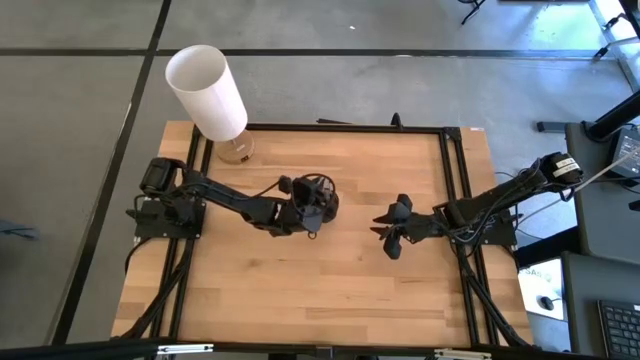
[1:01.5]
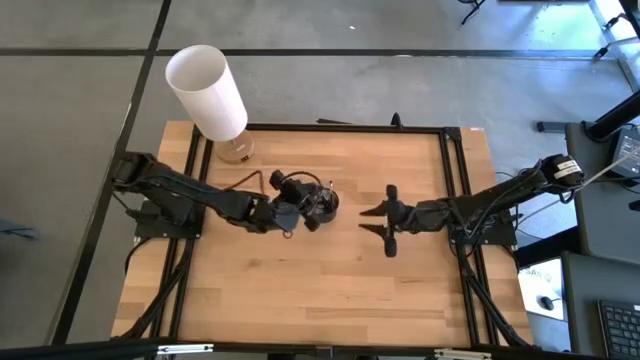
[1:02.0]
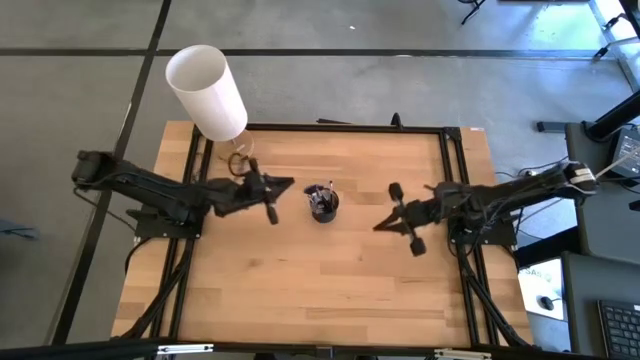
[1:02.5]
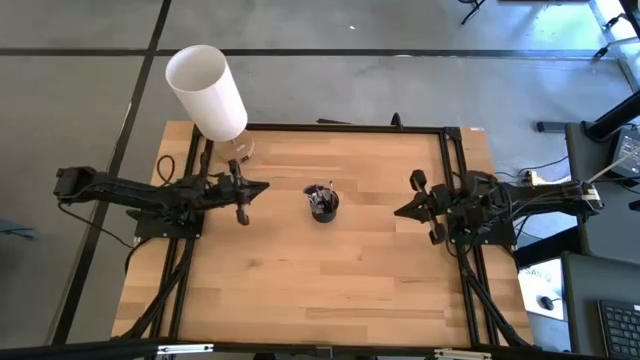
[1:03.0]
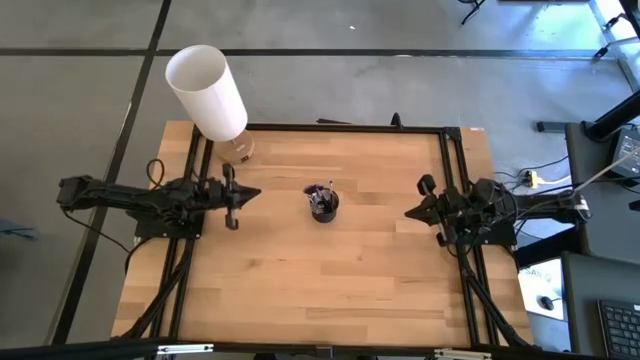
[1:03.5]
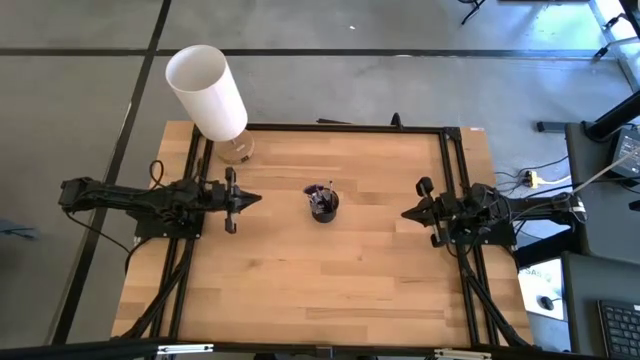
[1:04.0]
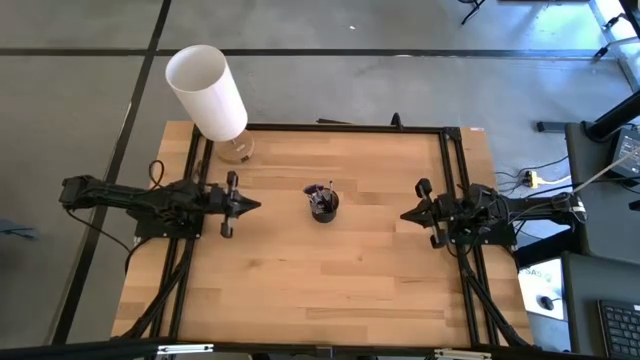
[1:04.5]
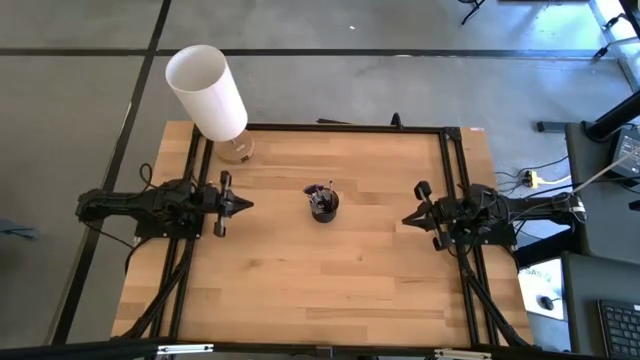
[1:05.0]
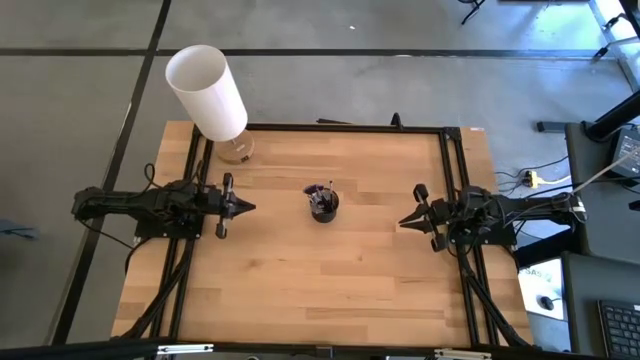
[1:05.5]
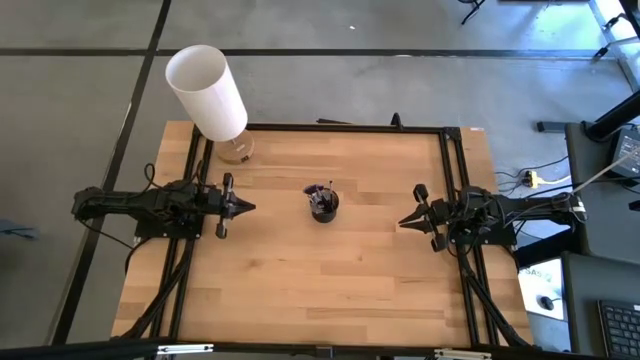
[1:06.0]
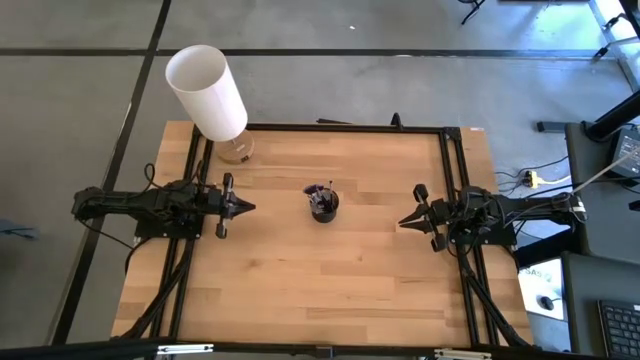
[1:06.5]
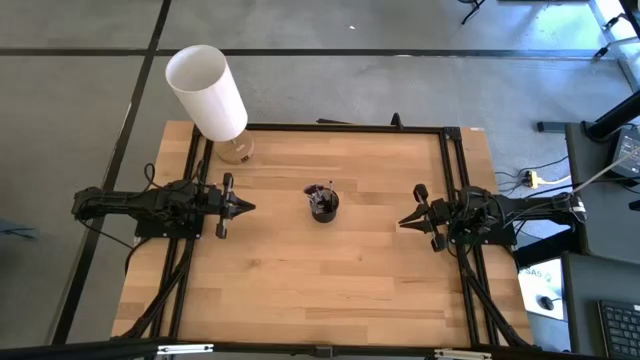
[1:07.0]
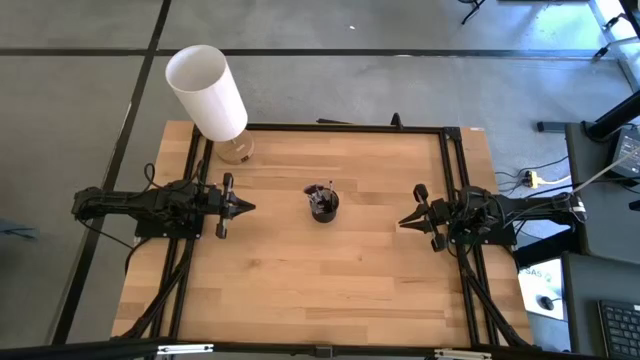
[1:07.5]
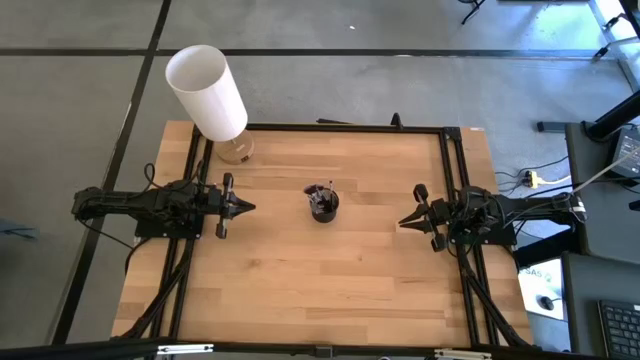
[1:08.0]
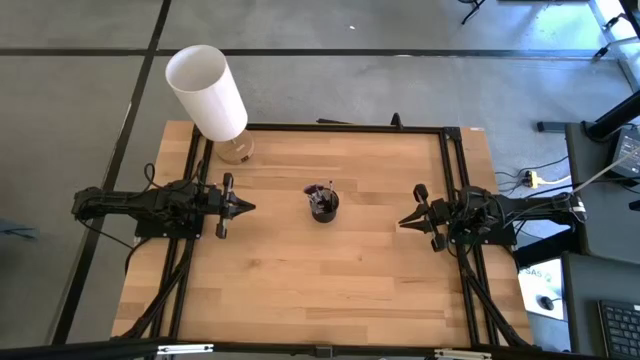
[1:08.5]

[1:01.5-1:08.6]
Task: Pick & Place Makeup Brushes
Return to home position

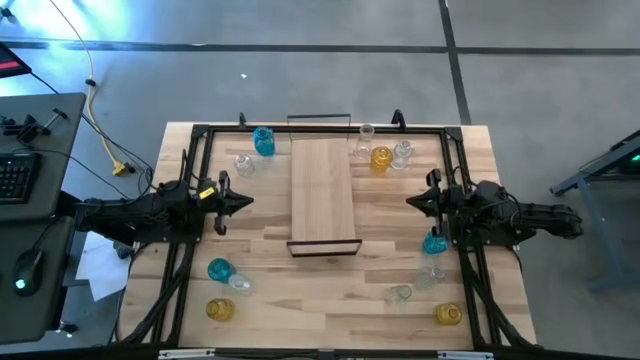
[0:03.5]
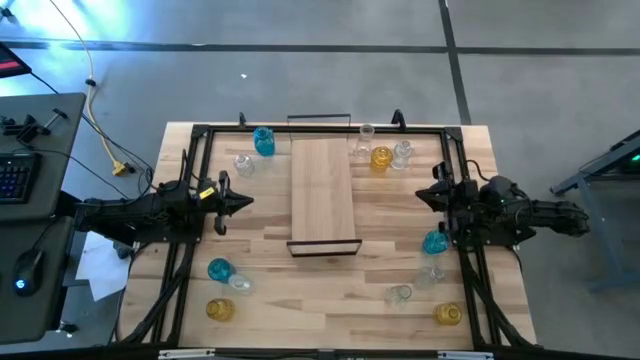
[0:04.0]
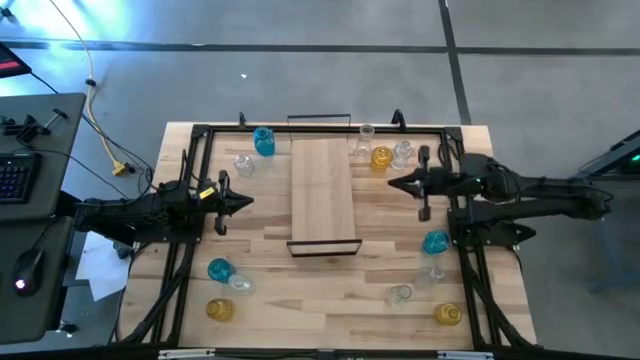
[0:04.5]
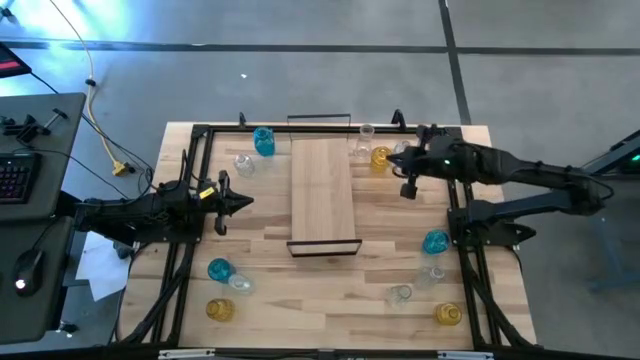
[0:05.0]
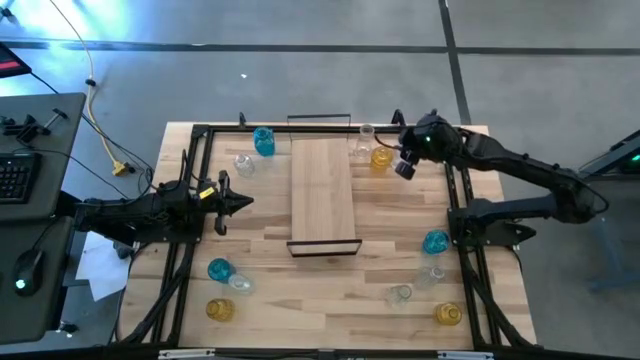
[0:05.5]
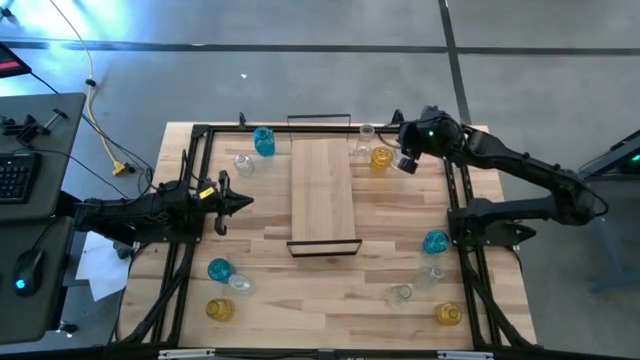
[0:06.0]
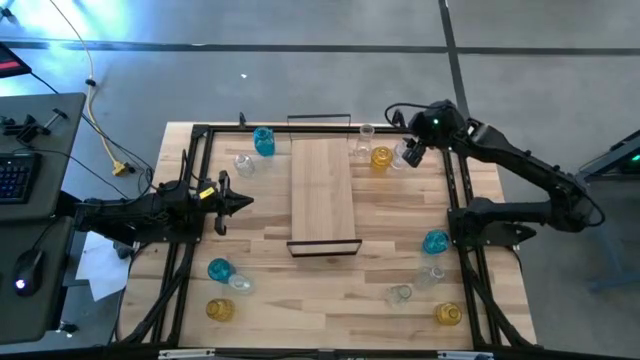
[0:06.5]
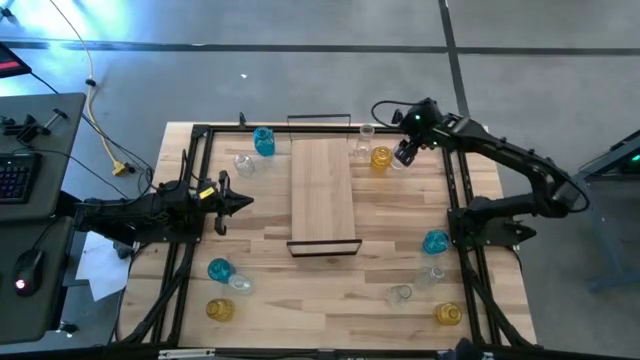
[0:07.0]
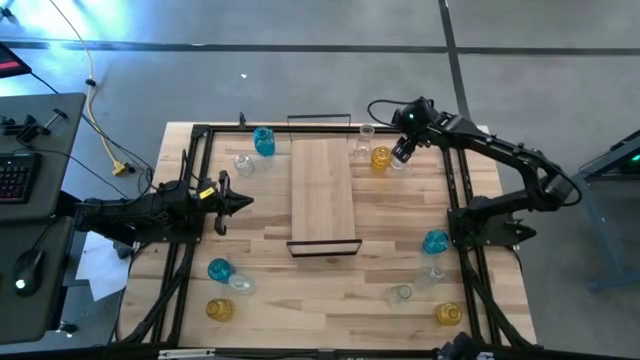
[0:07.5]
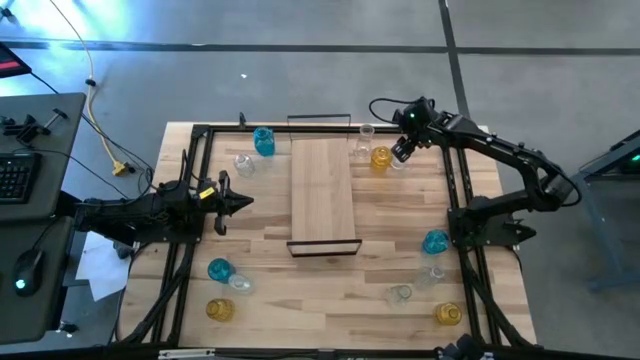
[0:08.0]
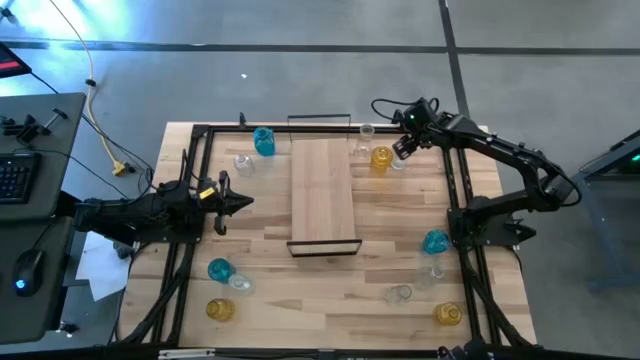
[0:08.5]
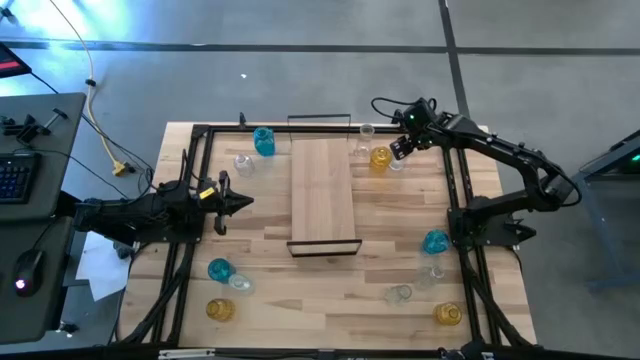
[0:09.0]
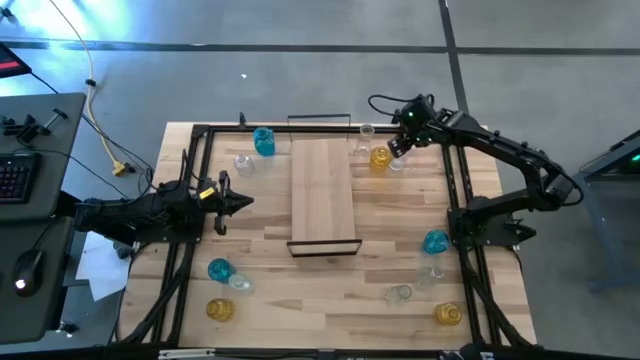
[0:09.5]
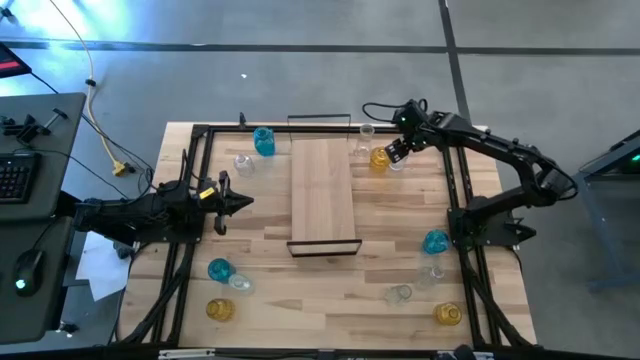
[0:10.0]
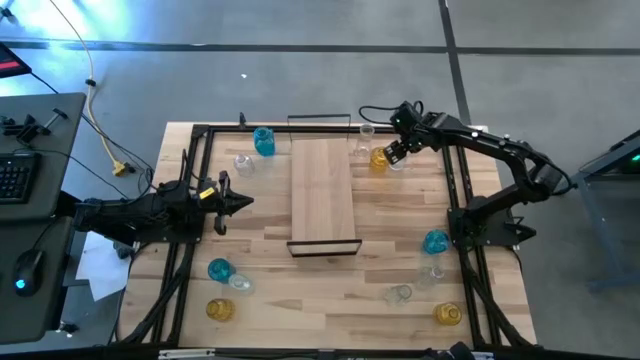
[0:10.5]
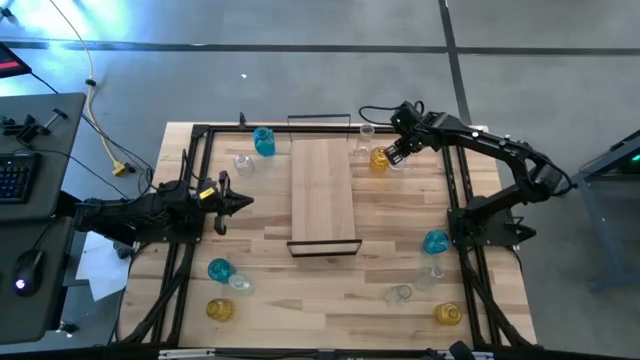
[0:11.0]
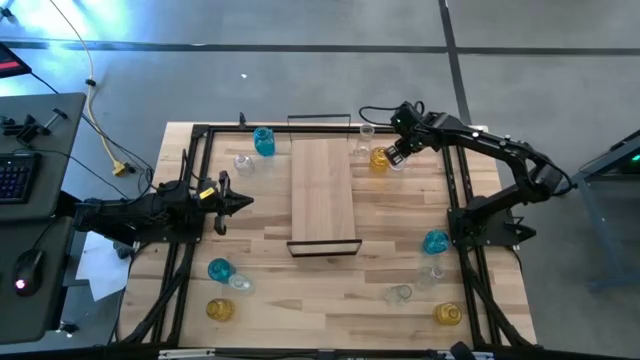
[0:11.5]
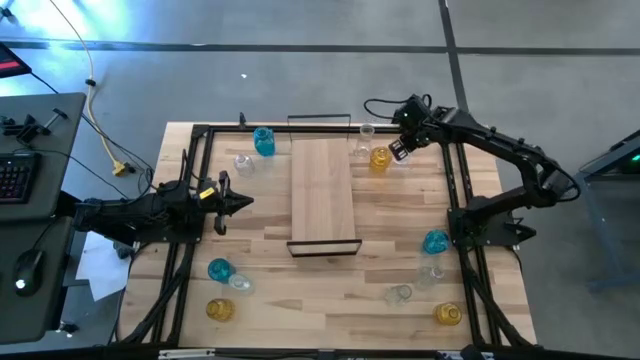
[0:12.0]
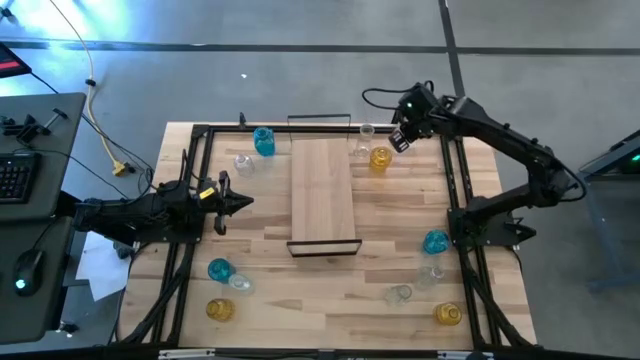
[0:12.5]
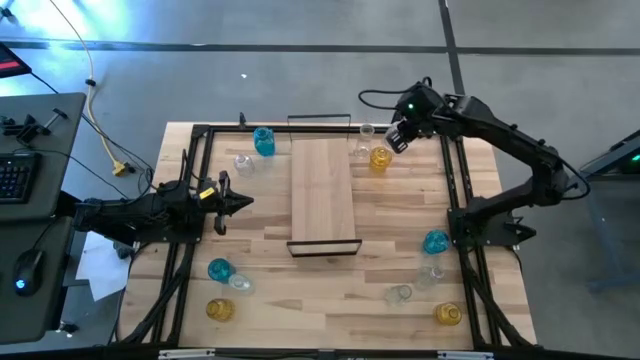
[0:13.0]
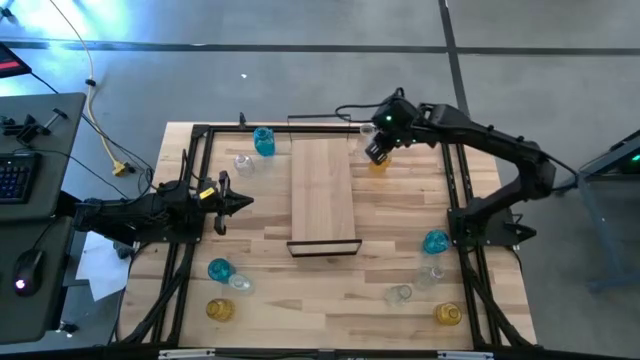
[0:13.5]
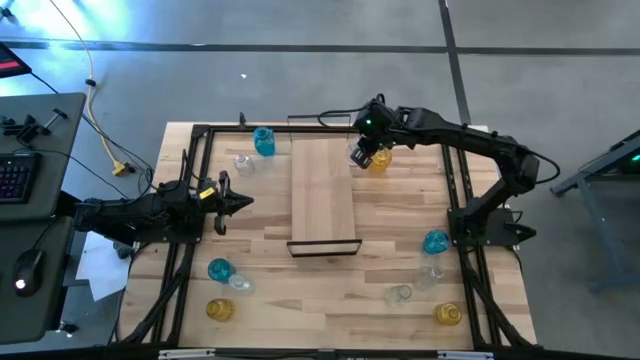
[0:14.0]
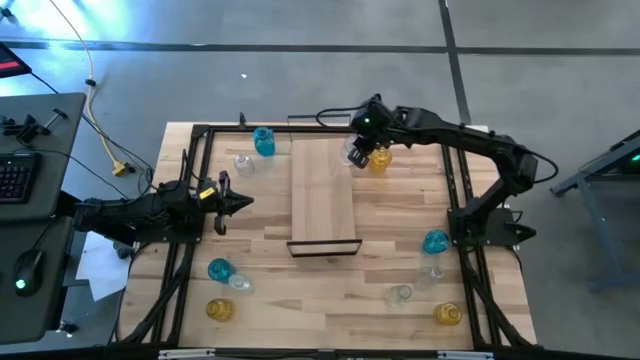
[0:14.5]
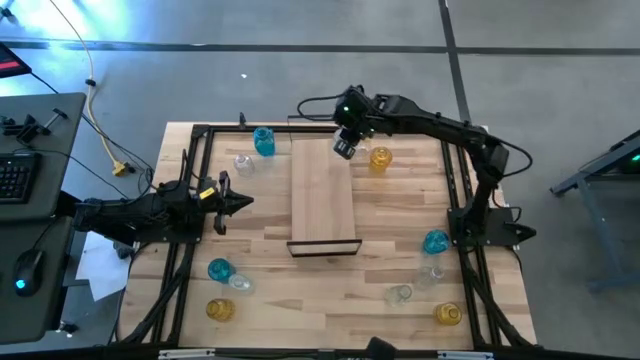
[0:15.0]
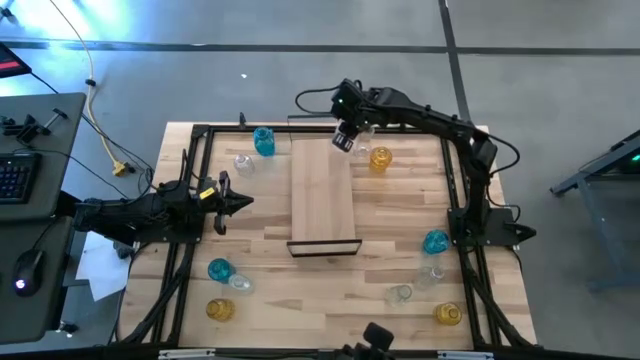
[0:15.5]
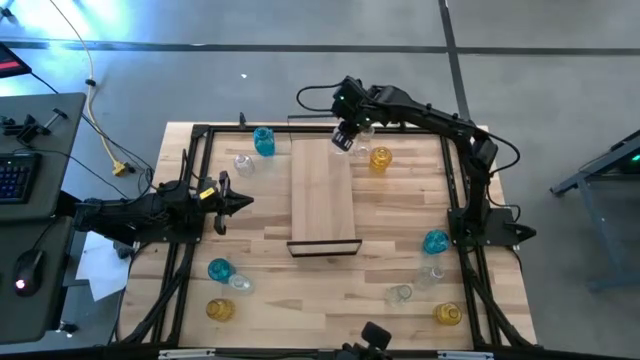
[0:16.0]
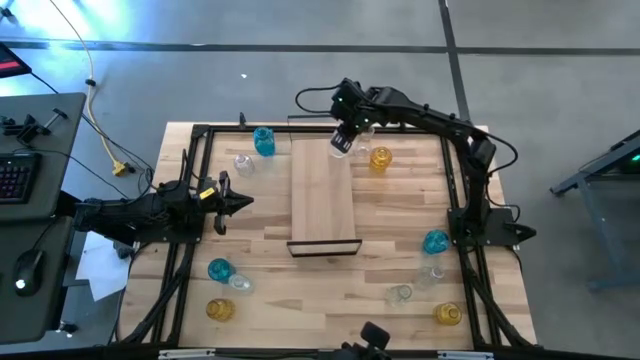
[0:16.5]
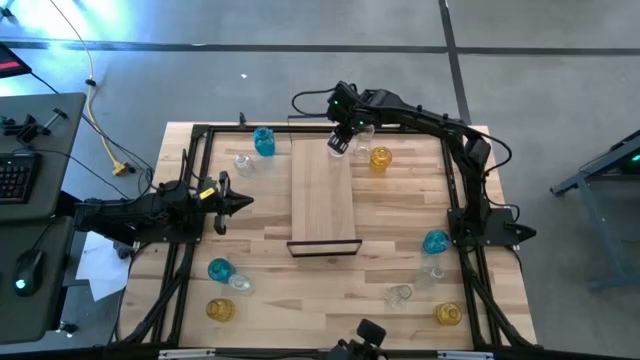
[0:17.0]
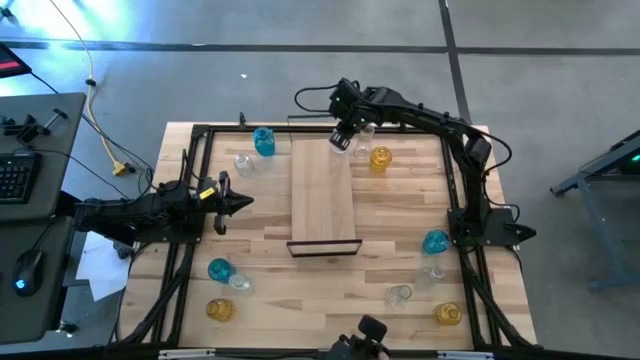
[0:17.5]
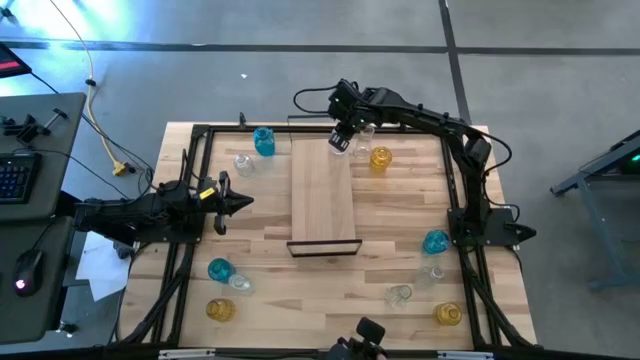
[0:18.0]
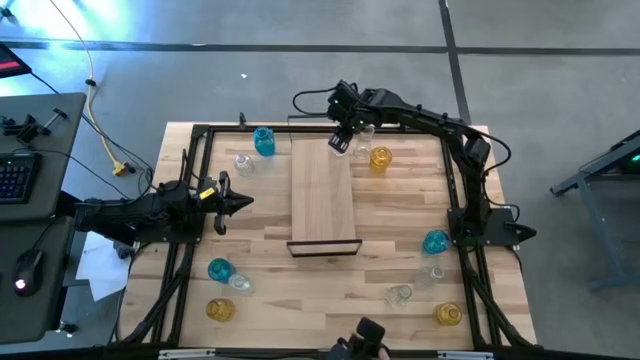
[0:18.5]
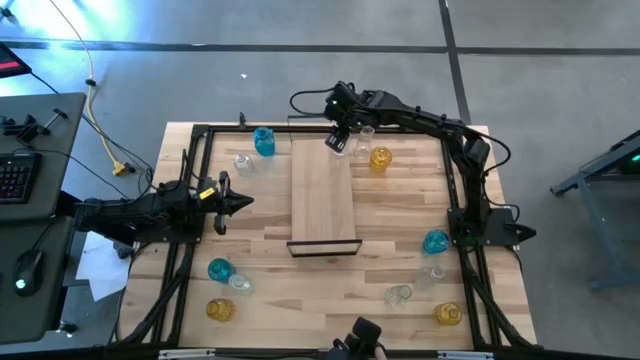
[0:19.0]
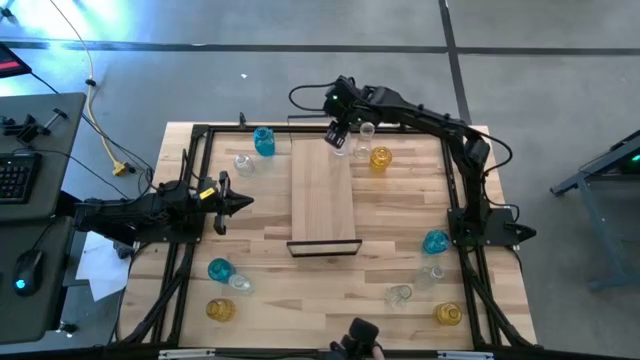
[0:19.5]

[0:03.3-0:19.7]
Task: sort vases onto shelf
Put the top right transparent flower vase on the shelf
